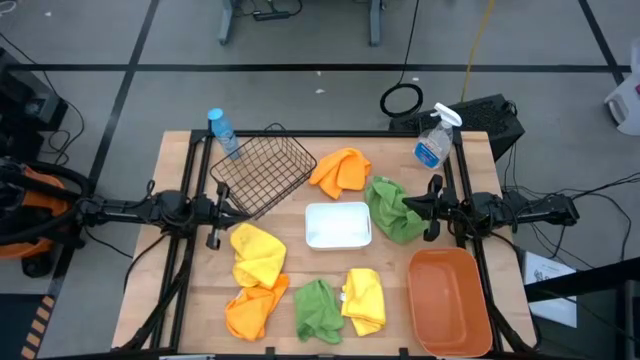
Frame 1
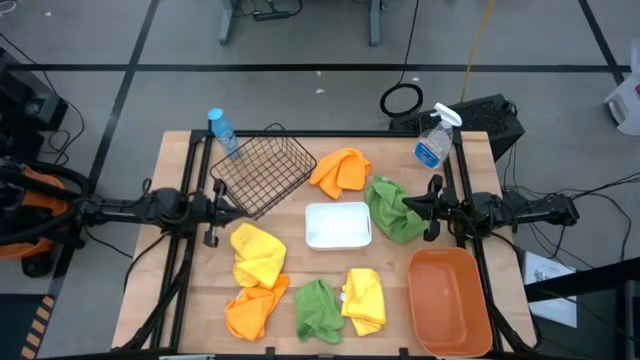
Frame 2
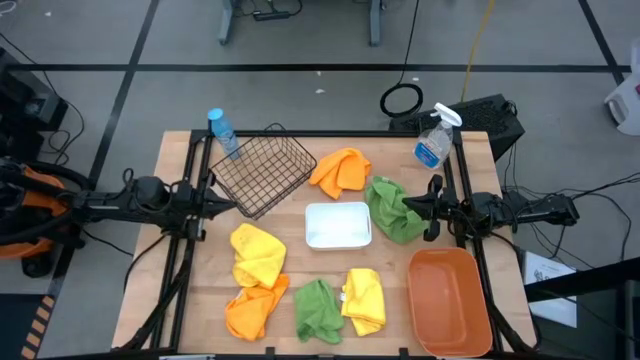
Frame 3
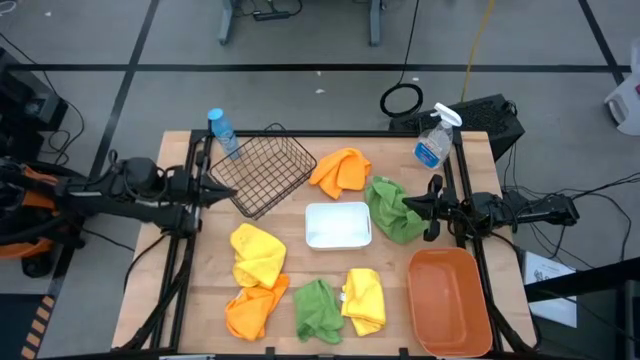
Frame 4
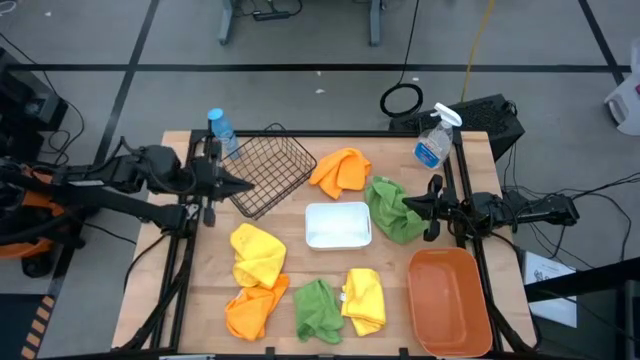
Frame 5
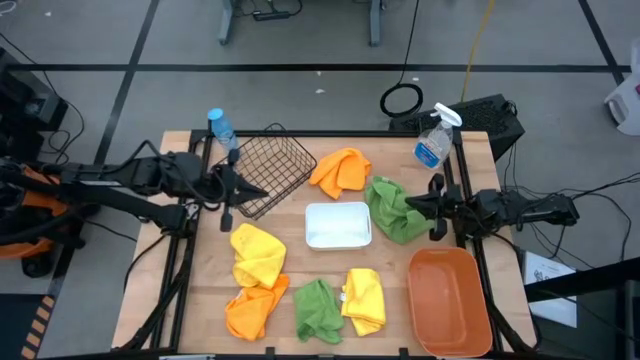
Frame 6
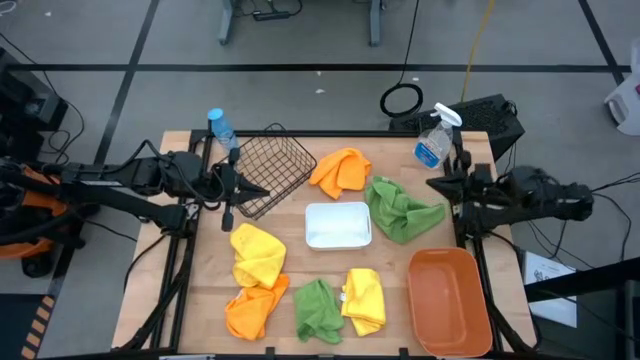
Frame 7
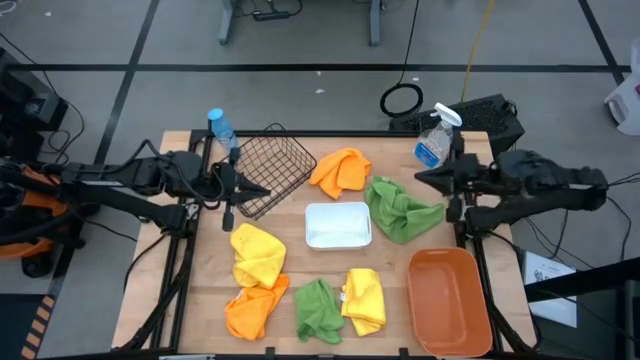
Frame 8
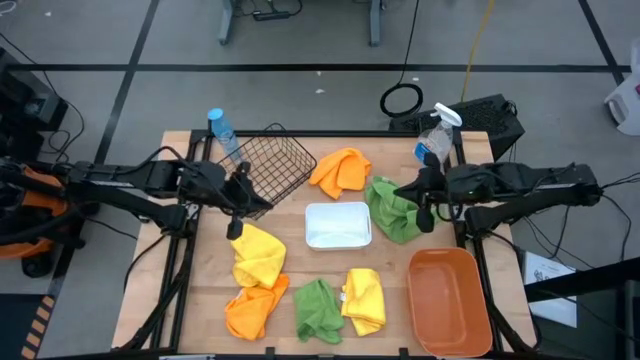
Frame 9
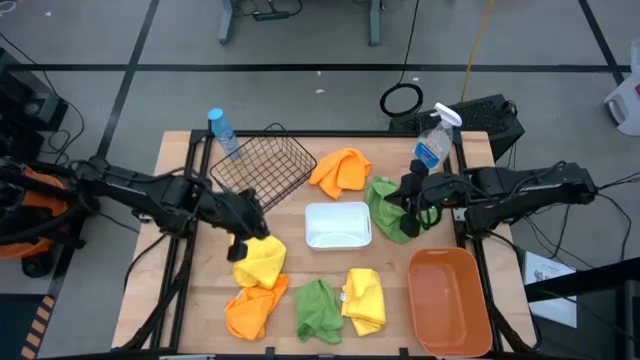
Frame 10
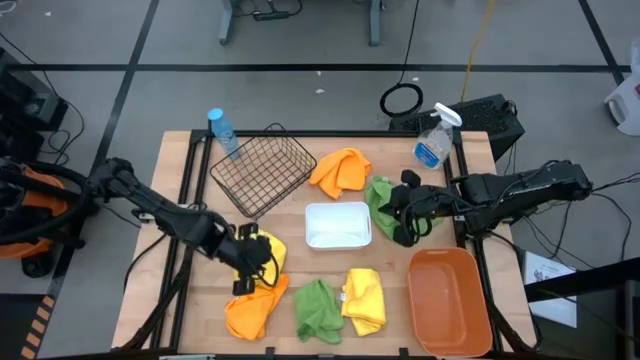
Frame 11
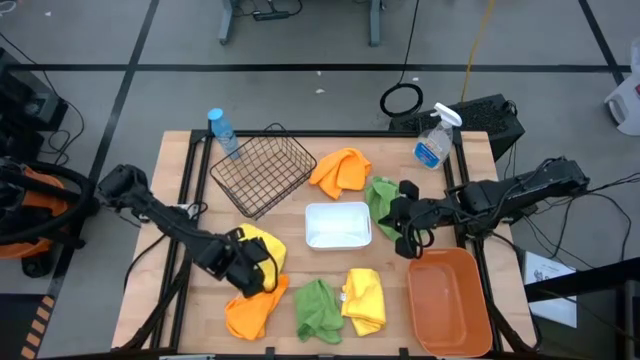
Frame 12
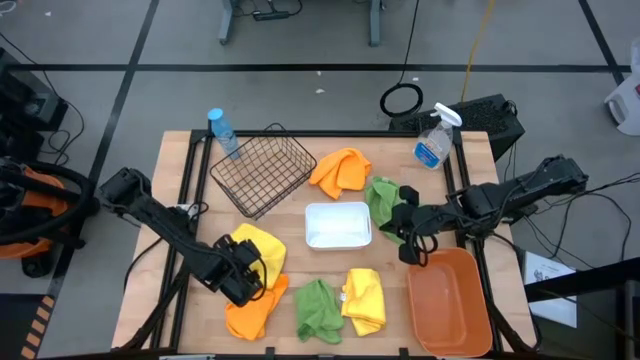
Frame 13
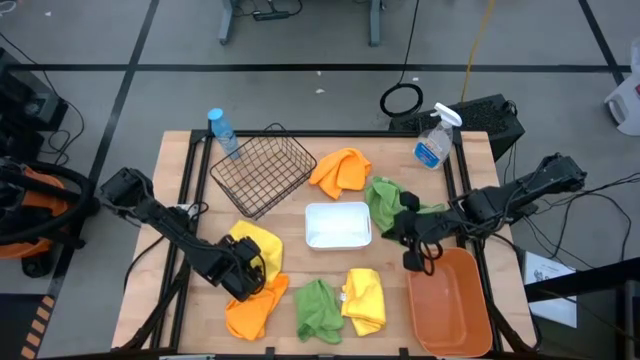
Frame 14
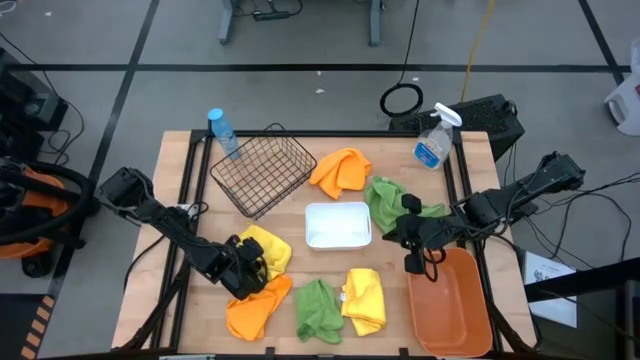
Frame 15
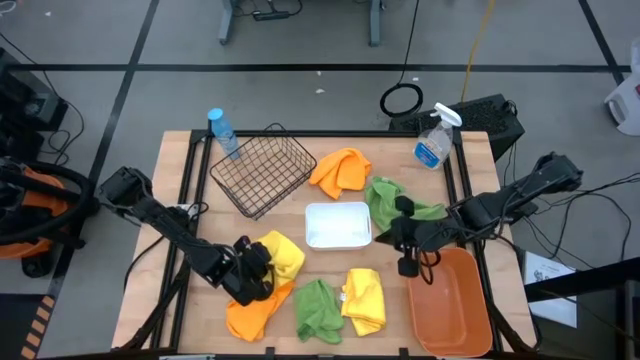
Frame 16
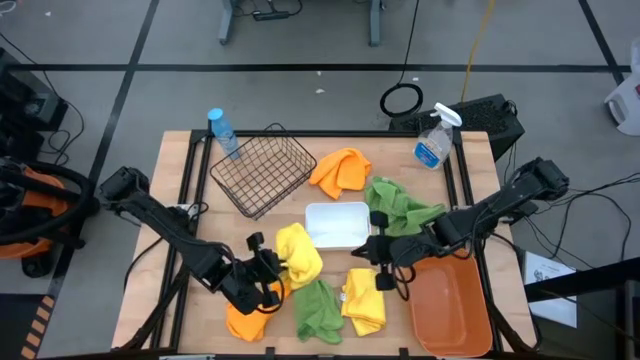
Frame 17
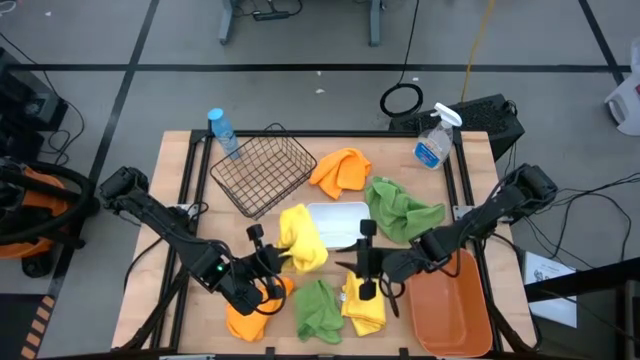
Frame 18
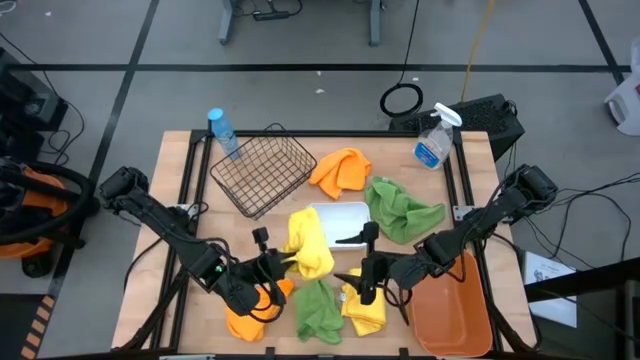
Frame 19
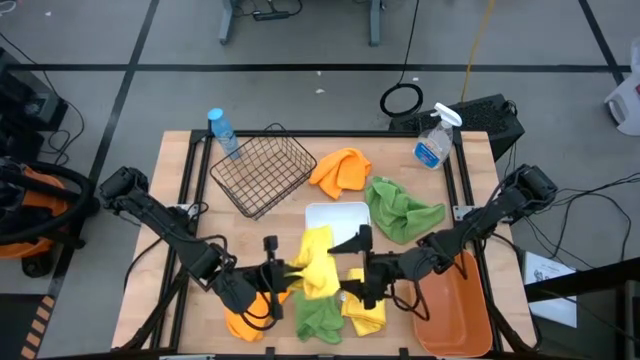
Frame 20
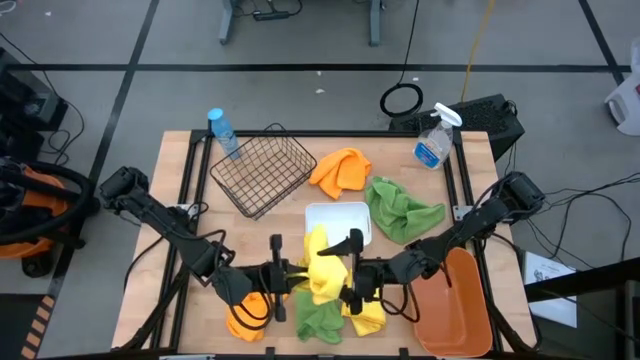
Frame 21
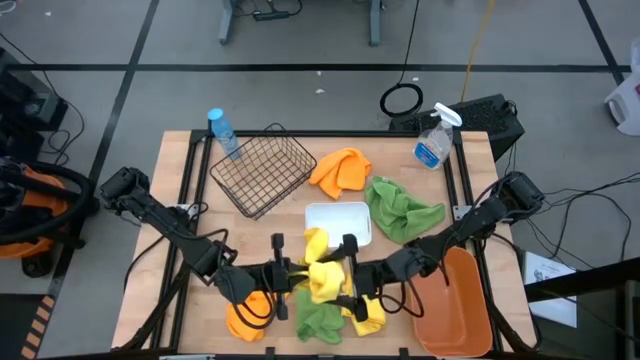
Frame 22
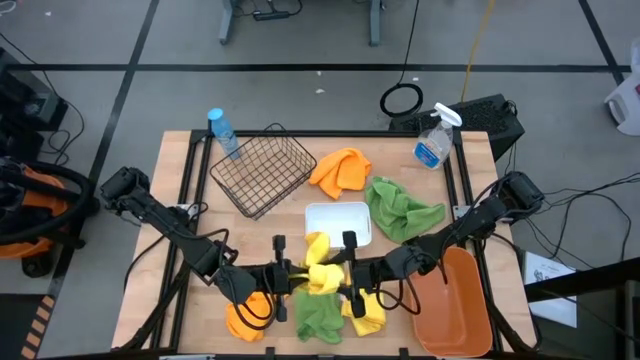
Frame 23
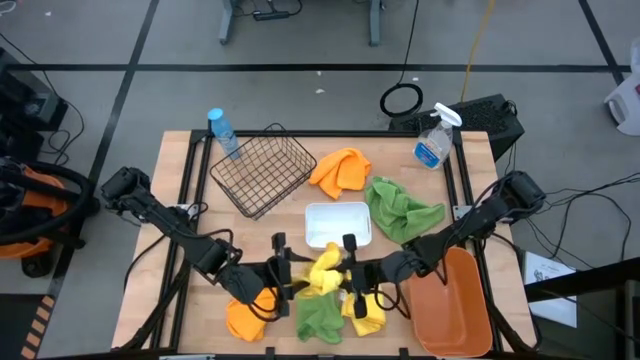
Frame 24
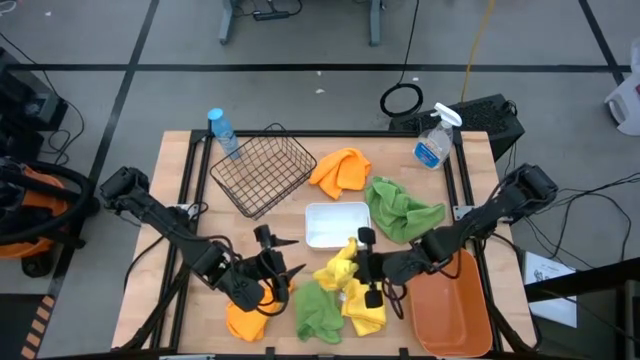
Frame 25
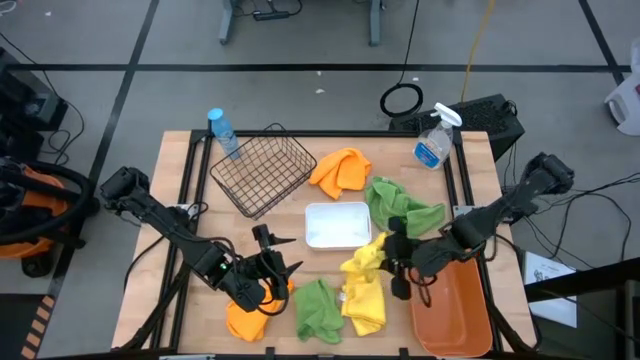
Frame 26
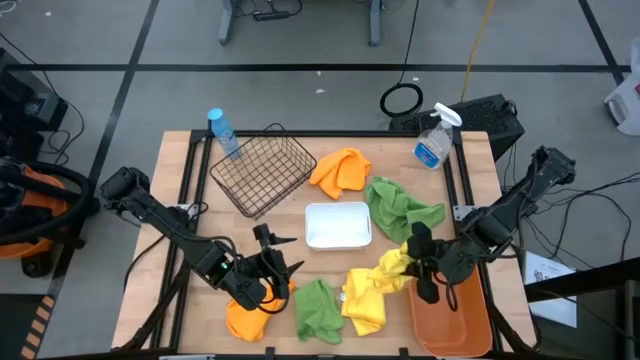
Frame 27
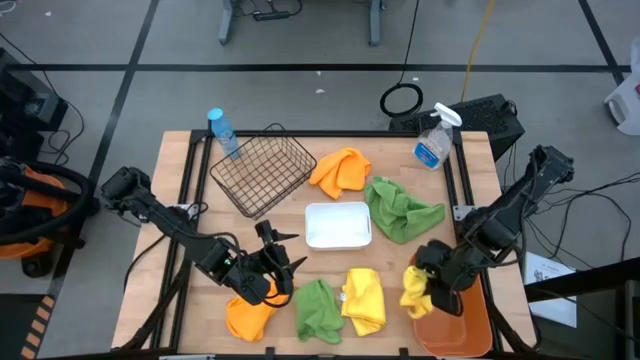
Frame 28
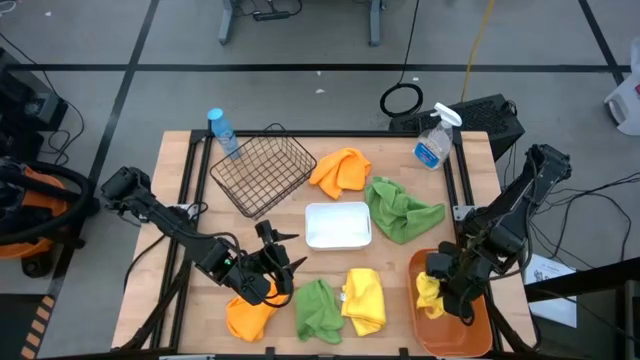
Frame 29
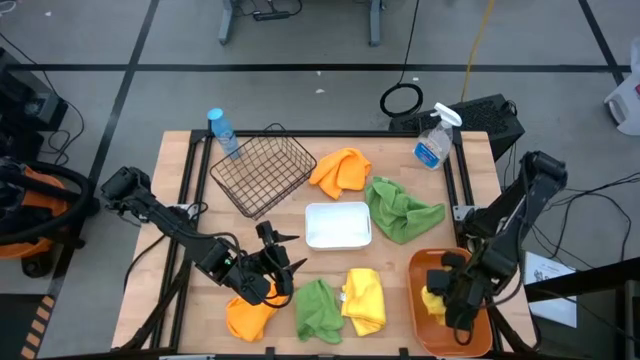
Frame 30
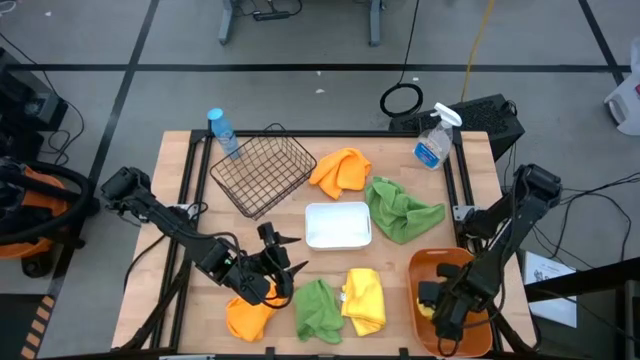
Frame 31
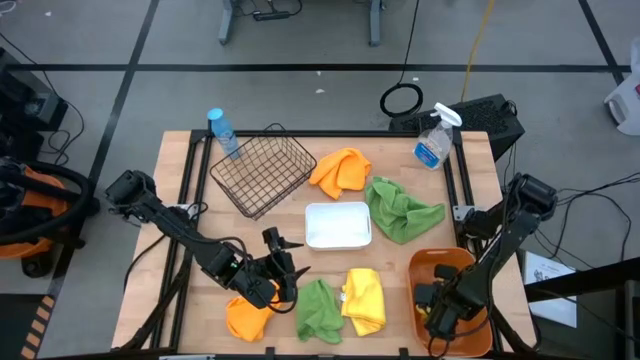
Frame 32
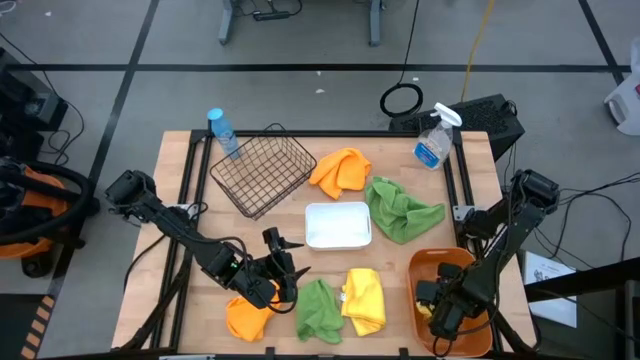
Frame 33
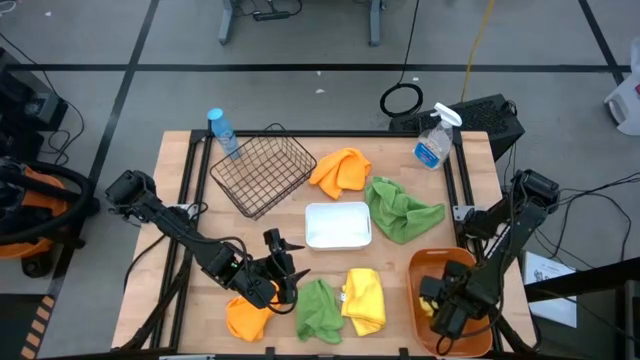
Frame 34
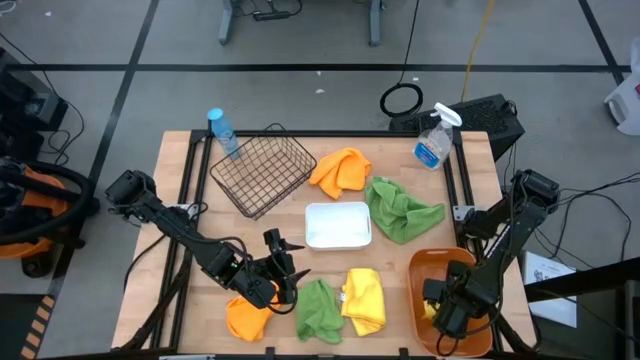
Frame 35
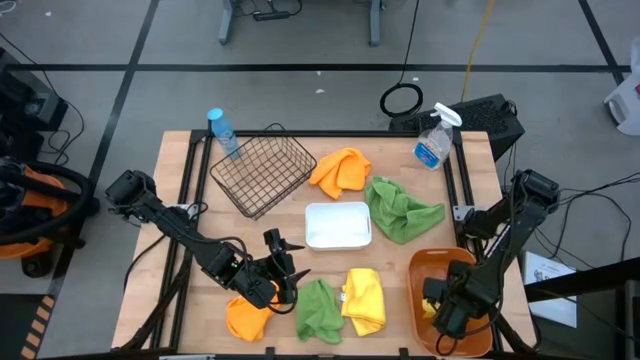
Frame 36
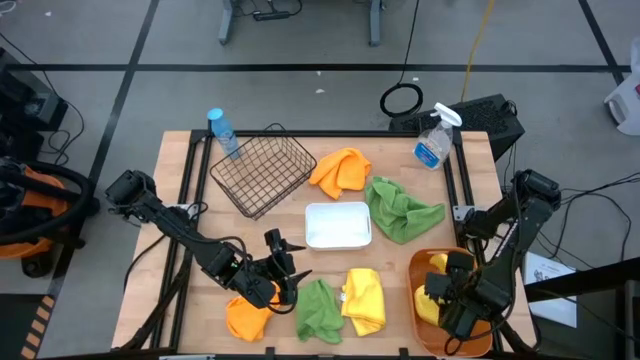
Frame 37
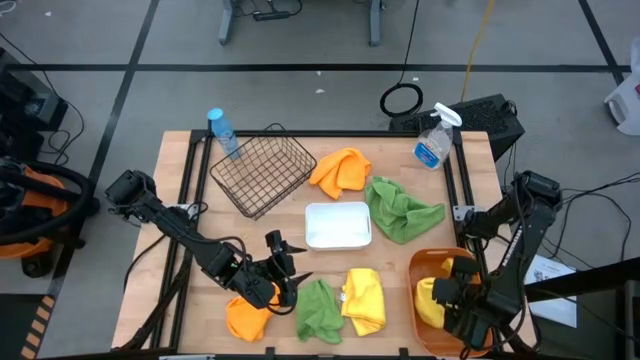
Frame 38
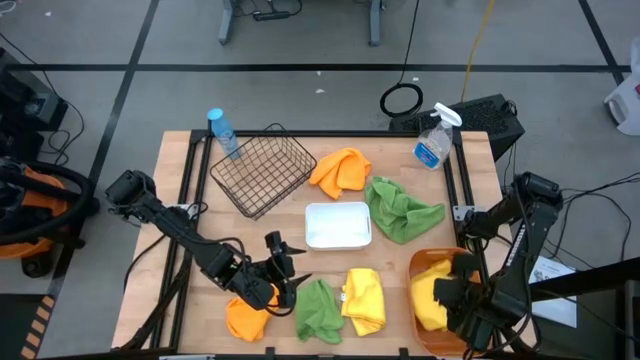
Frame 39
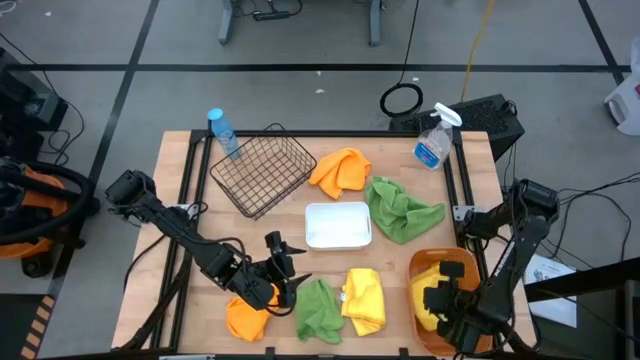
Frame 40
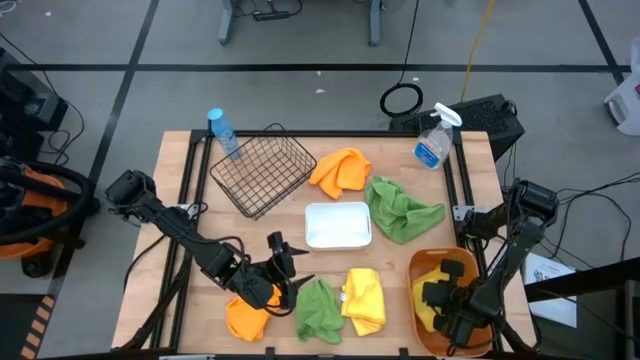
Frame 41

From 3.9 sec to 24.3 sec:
Task: Sort microfiber towel by color & place in baskets
Put the left yellow microfiber towel into the orange bin
